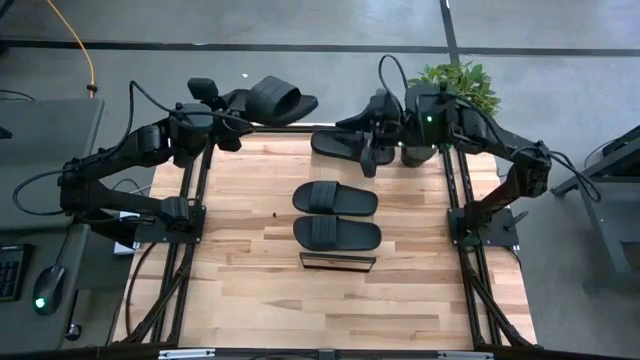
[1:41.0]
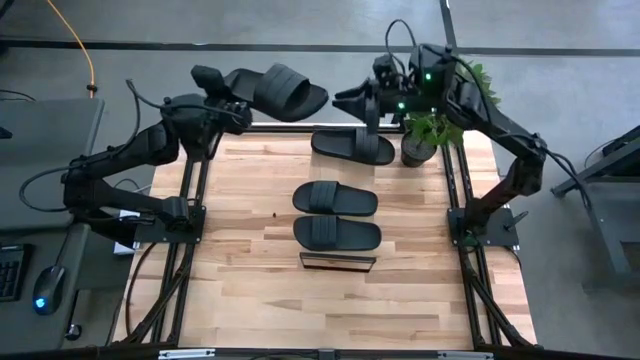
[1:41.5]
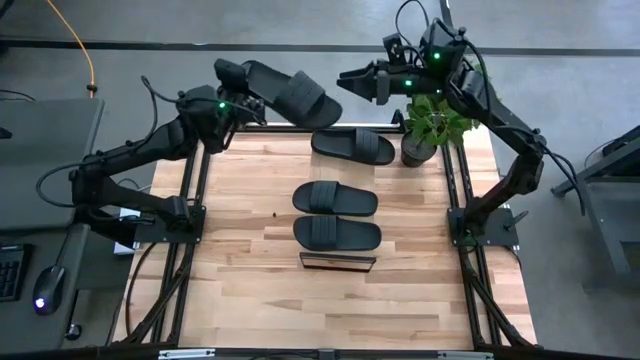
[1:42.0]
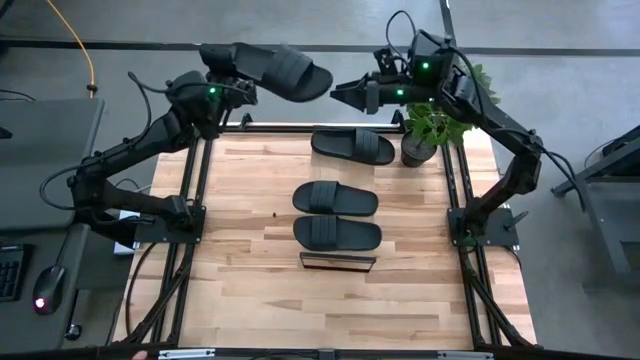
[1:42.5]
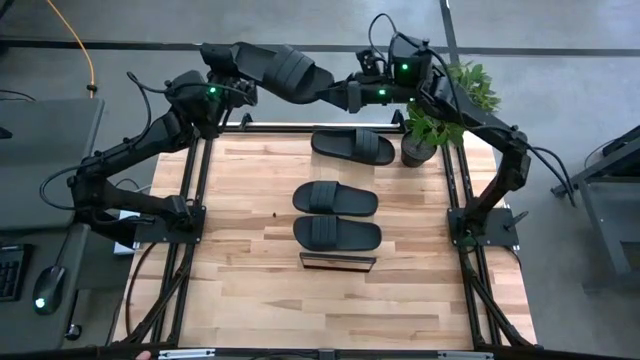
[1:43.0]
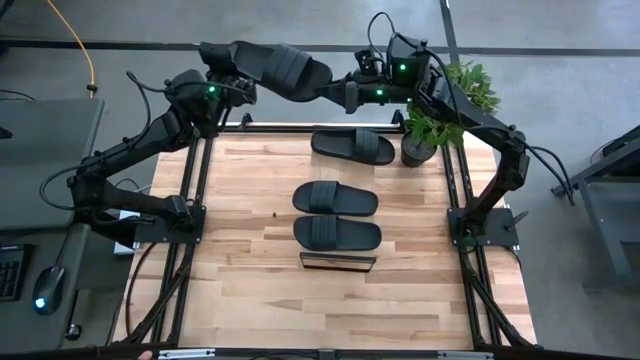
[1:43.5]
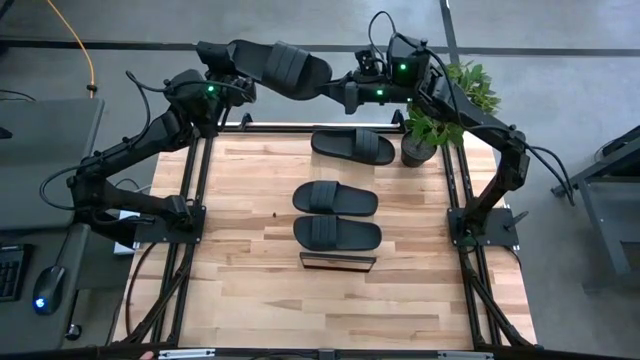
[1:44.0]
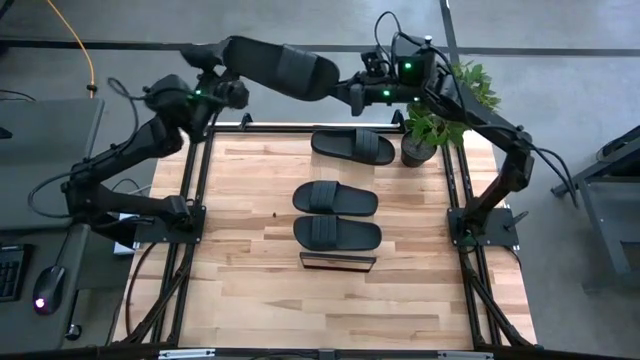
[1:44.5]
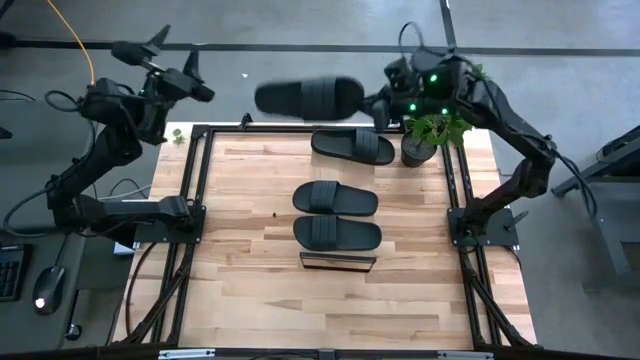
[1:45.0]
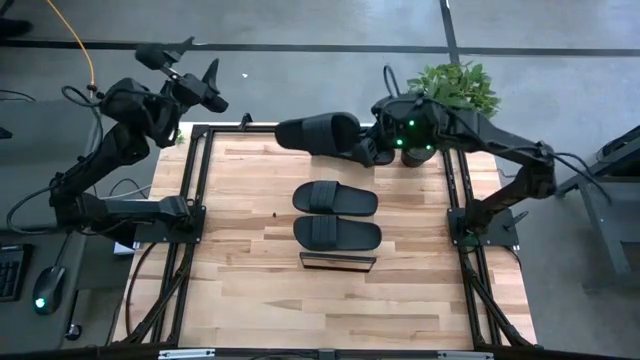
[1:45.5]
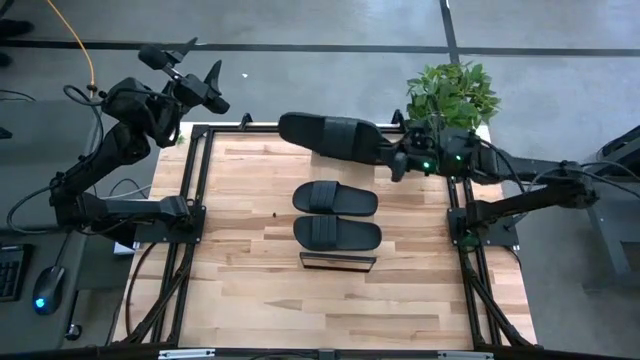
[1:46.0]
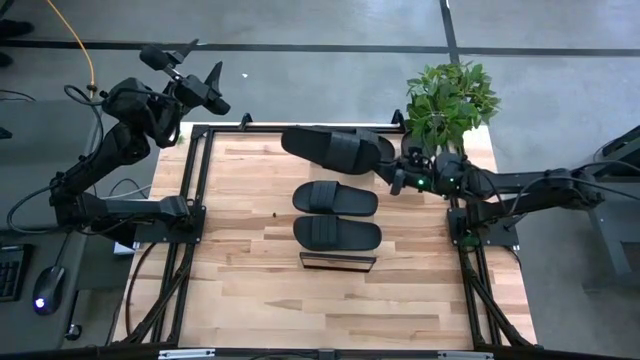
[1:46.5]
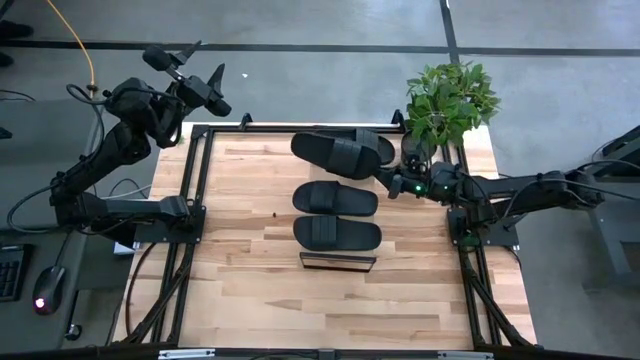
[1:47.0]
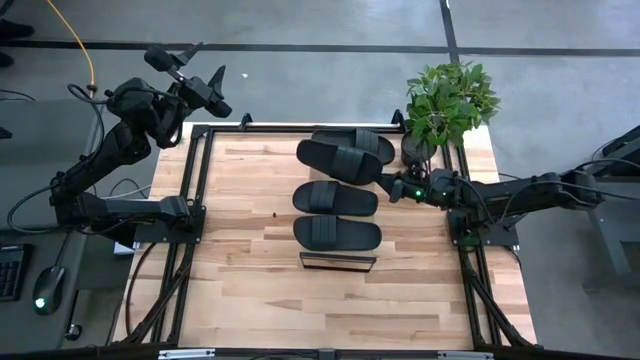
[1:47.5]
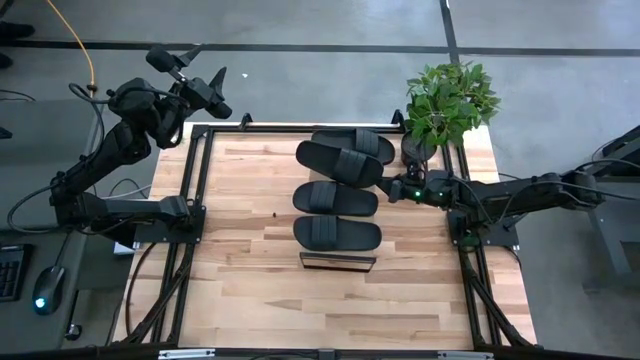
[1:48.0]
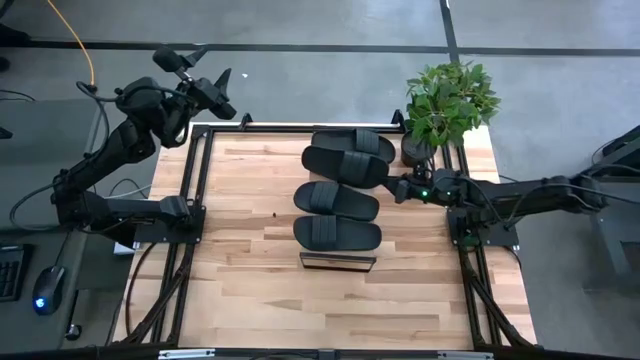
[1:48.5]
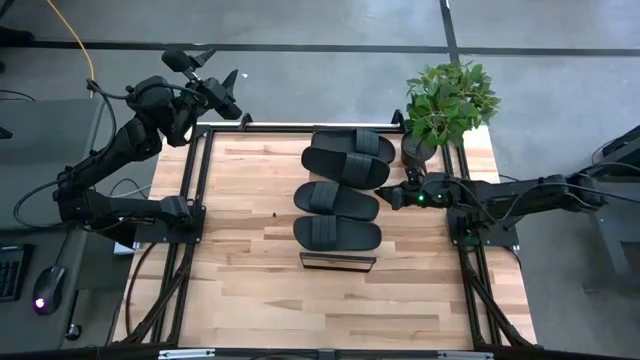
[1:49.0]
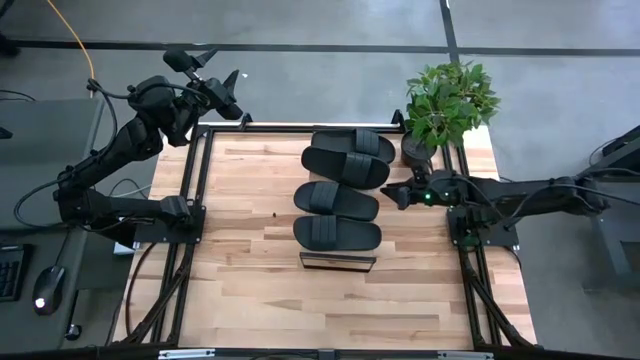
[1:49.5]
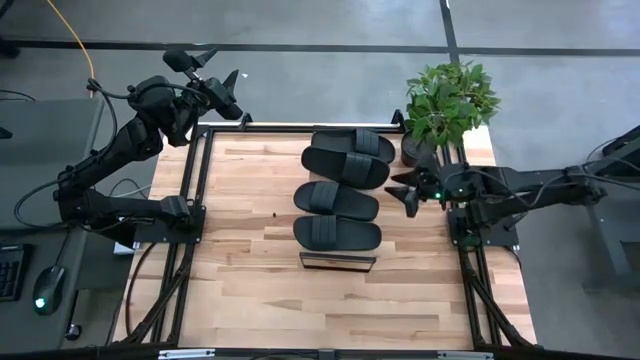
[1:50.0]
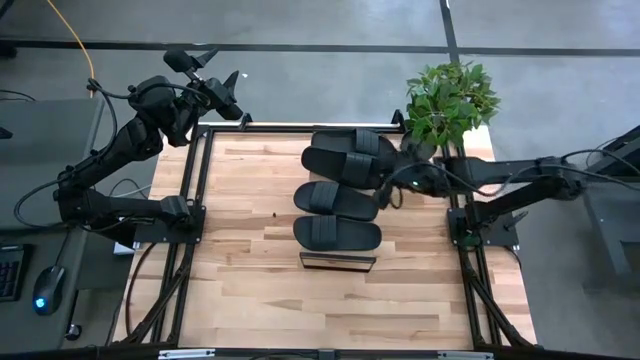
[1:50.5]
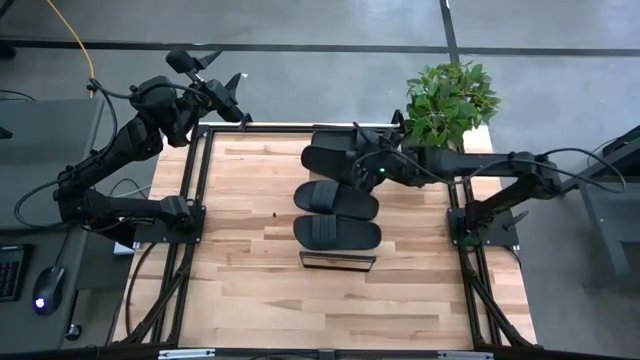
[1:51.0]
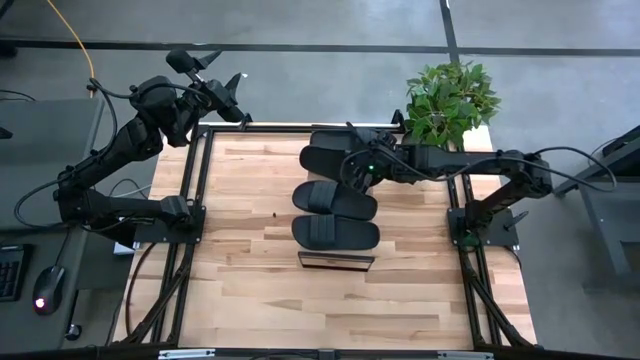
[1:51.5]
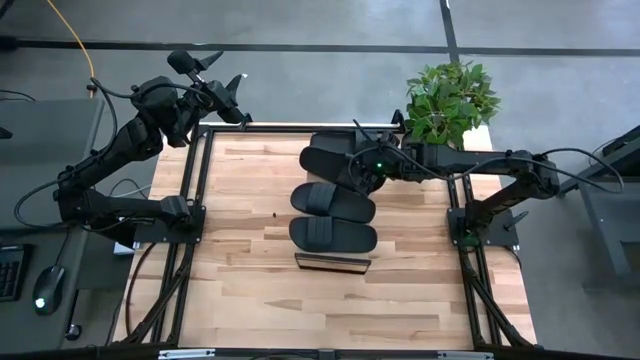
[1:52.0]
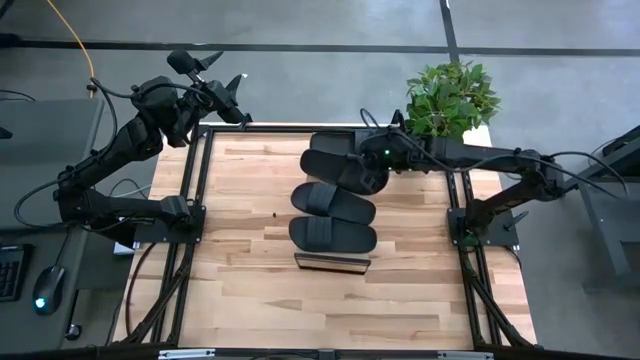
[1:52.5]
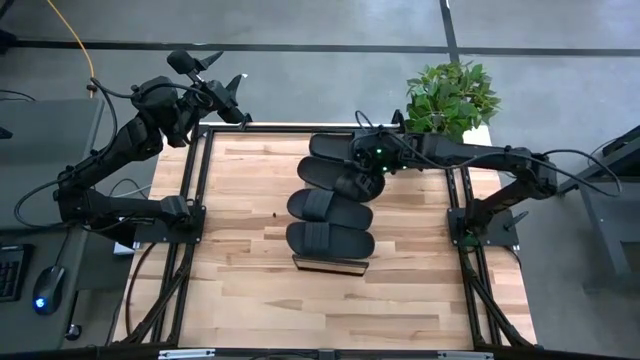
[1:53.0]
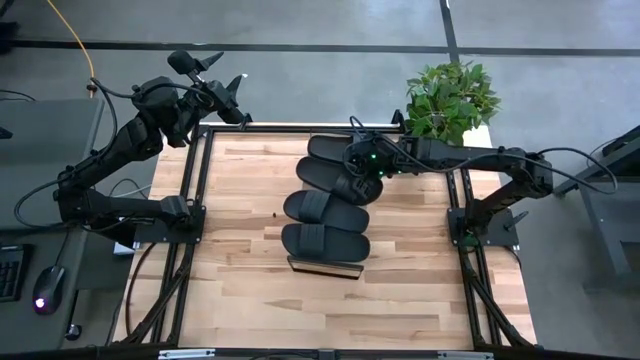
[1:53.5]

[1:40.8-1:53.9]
Task: Pick and place slides into the shelf
Put the black slipper on the shelf

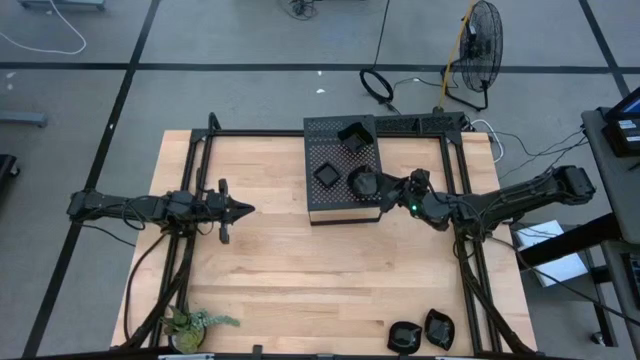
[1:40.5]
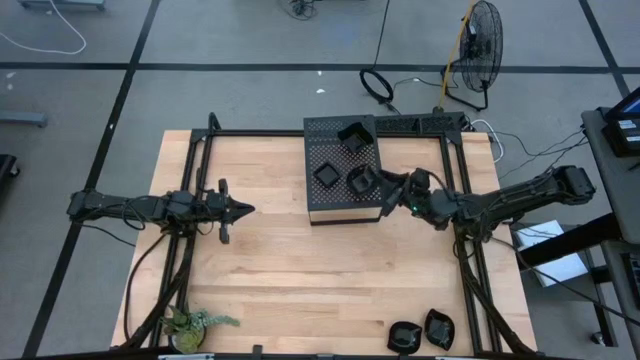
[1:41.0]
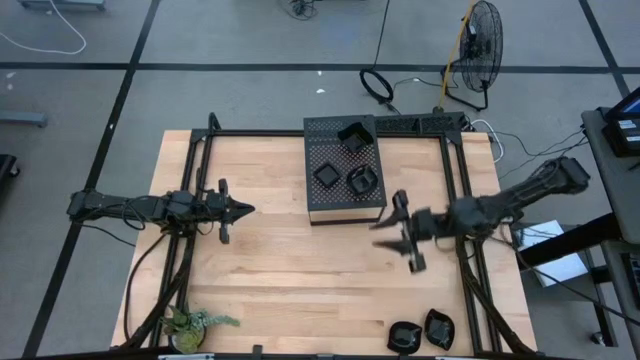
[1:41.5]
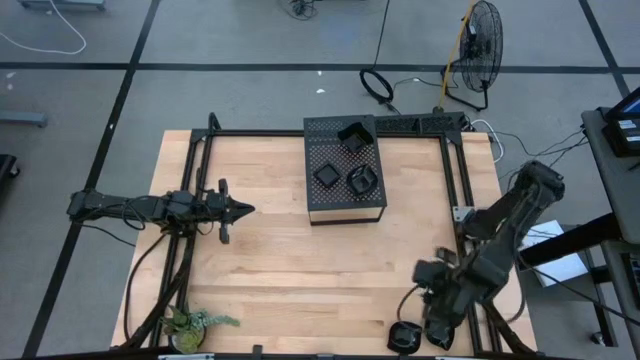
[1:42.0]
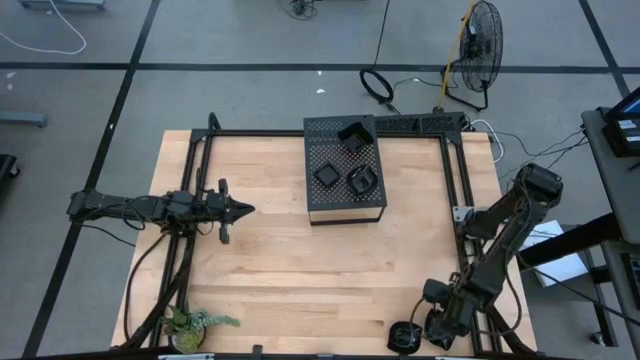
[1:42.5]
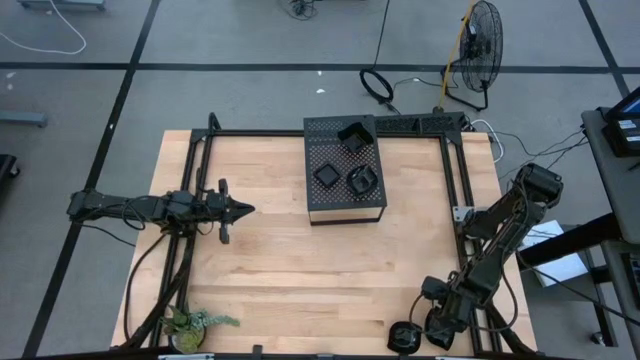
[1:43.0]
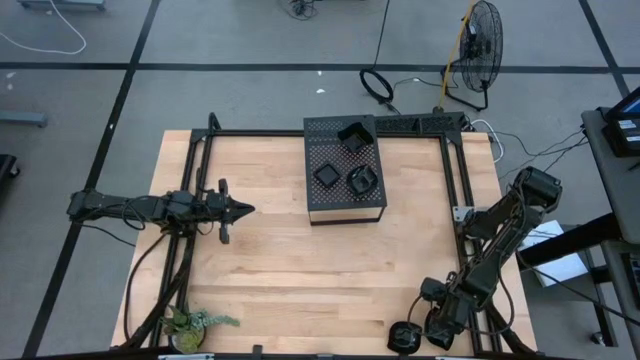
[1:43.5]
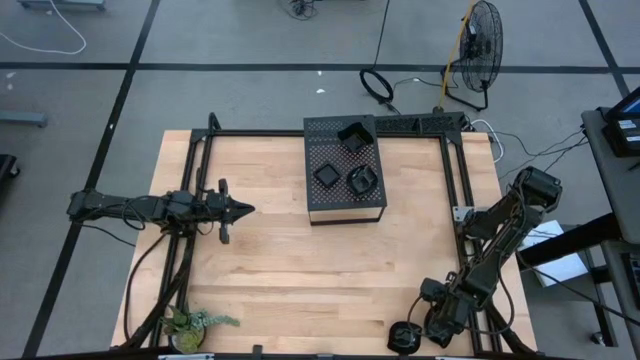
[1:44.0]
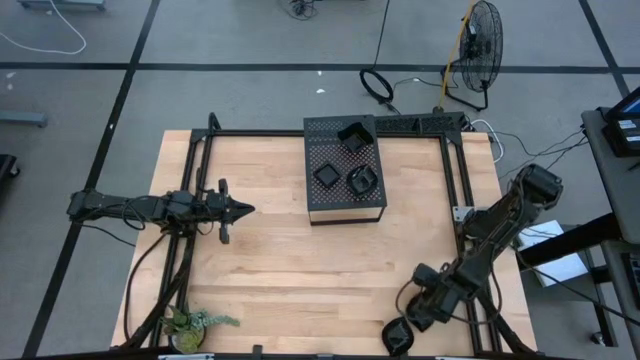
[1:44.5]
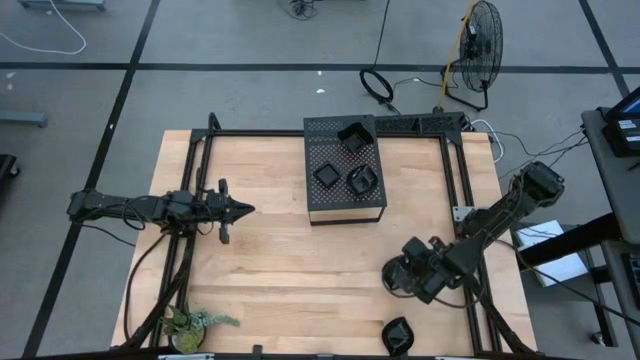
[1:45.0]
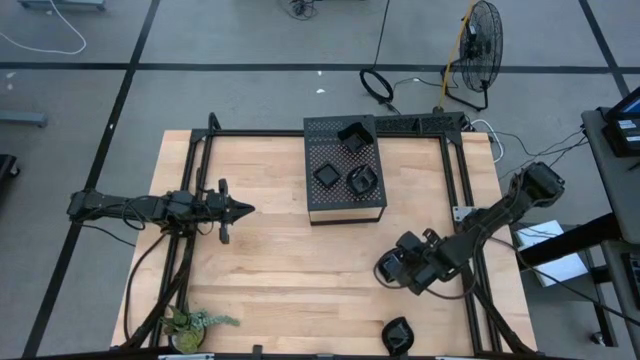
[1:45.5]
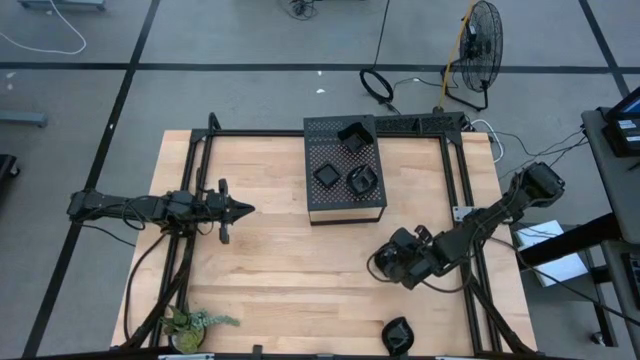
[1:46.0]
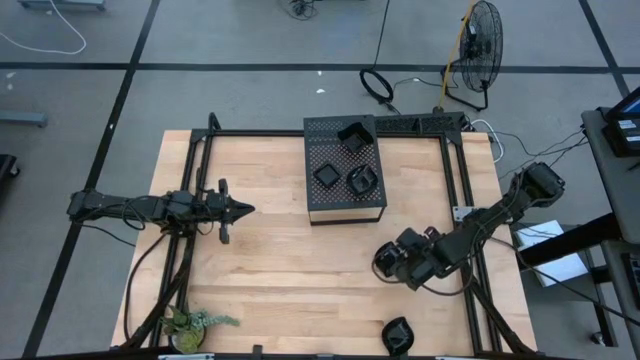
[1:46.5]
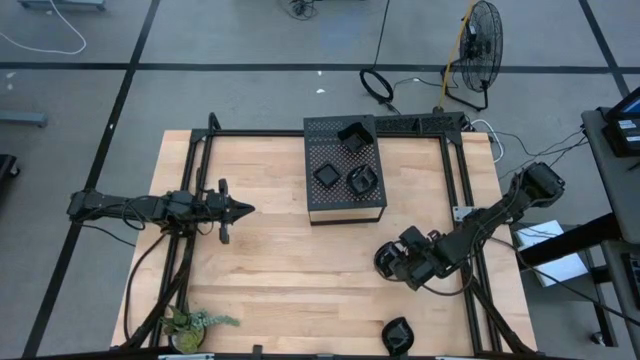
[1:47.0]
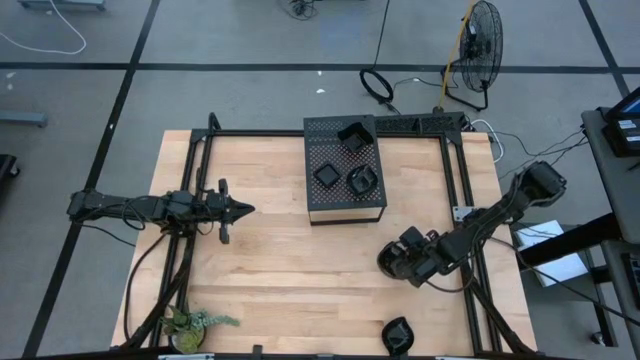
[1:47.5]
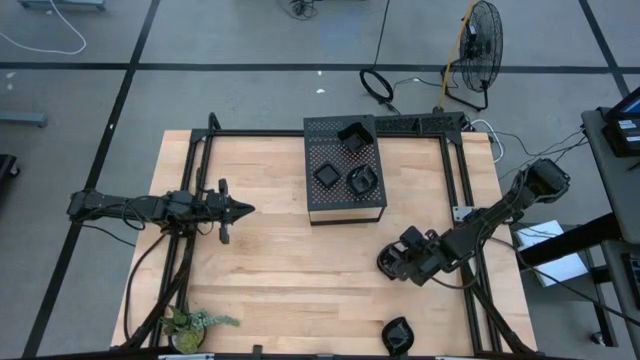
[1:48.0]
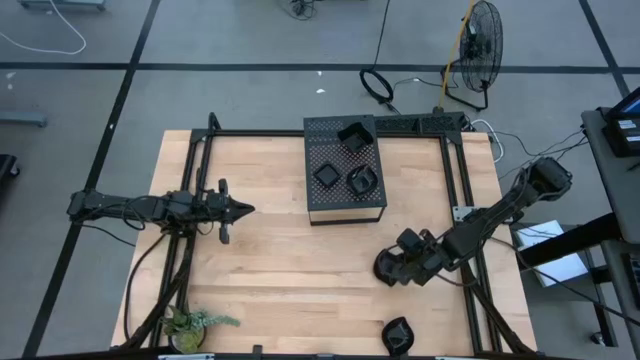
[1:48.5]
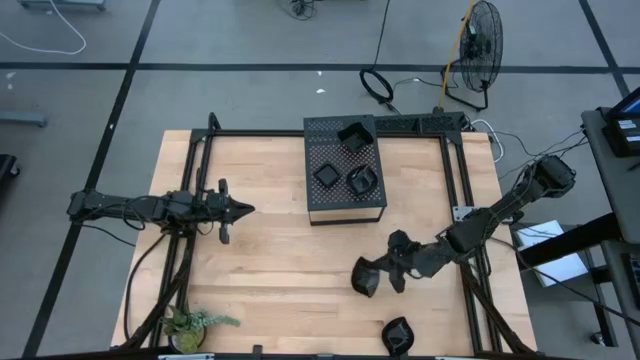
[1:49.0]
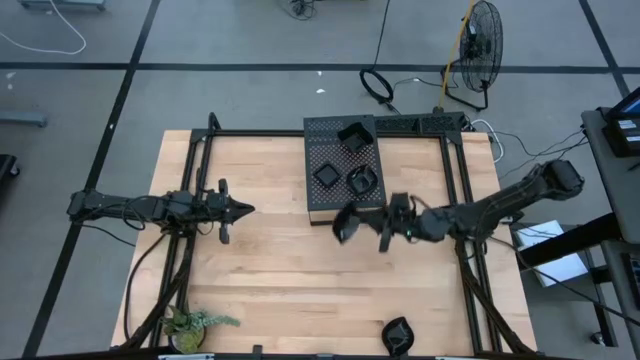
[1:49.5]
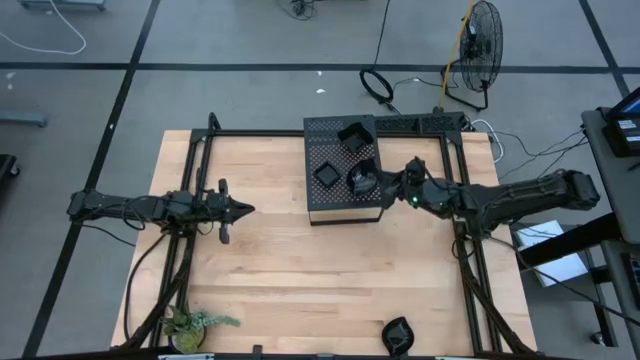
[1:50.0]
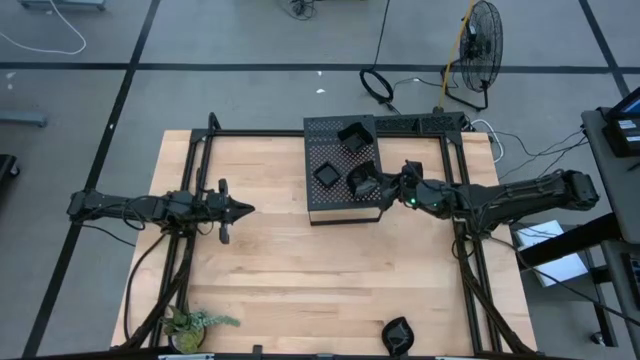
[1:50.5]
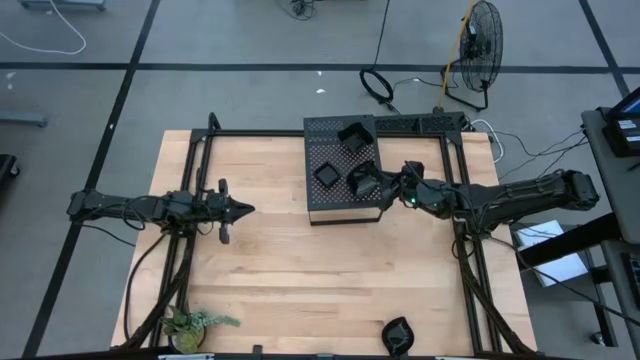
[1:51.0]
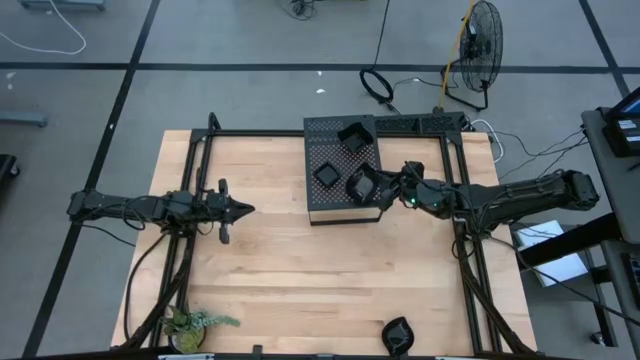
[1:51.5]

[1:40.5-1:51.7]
Task: Pick & Place Mini shaped plates
Stack the leaf shaped plate on top of the leaf shaped plate on the shelf
